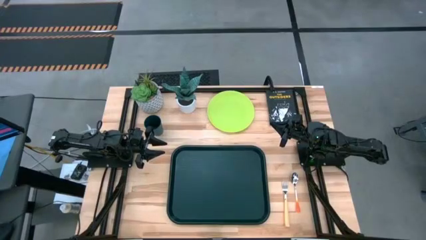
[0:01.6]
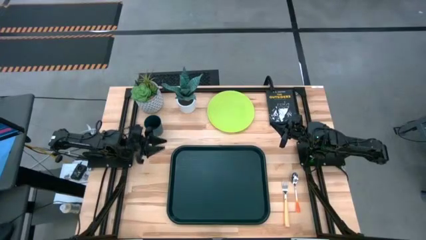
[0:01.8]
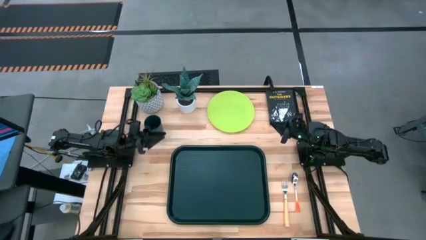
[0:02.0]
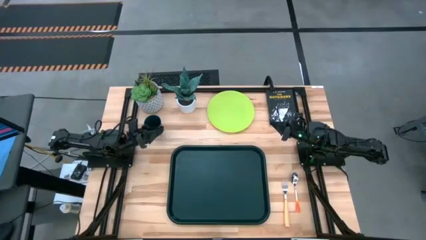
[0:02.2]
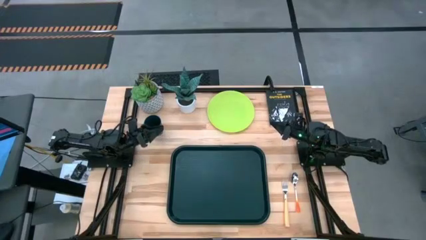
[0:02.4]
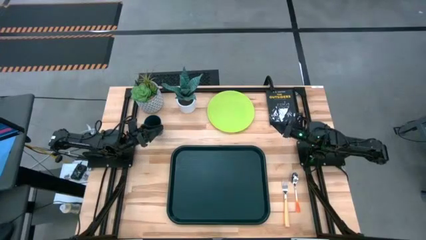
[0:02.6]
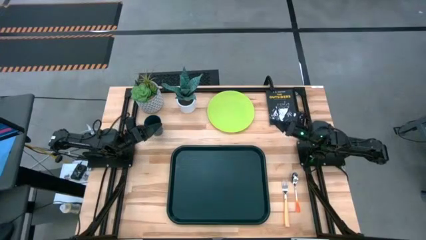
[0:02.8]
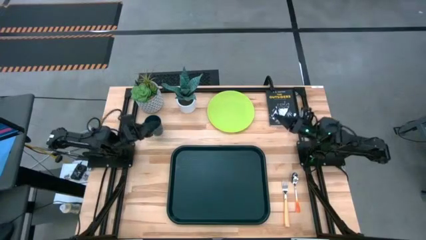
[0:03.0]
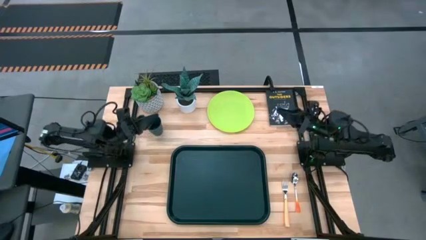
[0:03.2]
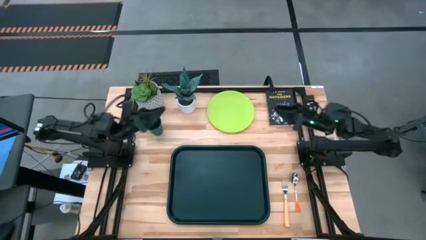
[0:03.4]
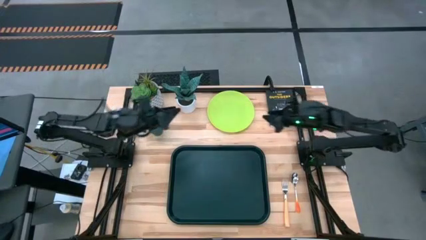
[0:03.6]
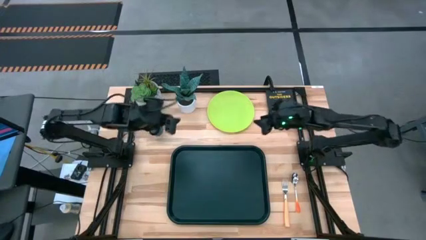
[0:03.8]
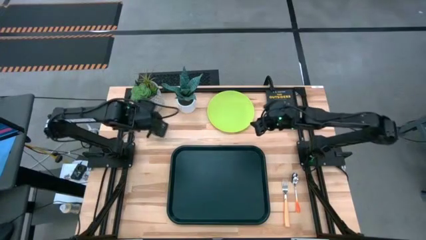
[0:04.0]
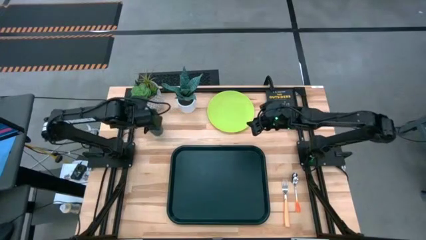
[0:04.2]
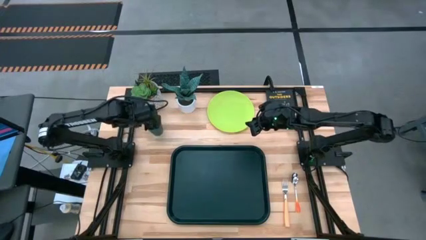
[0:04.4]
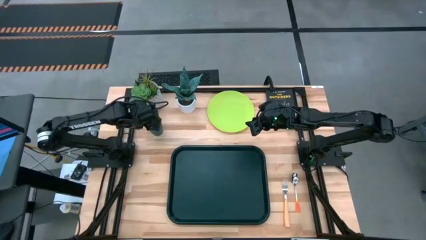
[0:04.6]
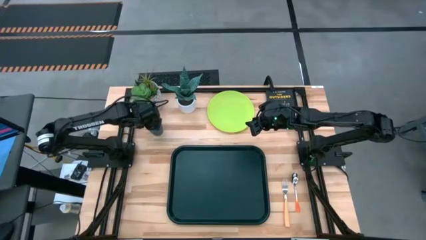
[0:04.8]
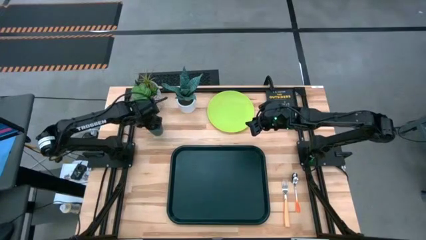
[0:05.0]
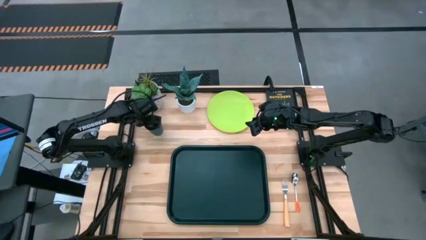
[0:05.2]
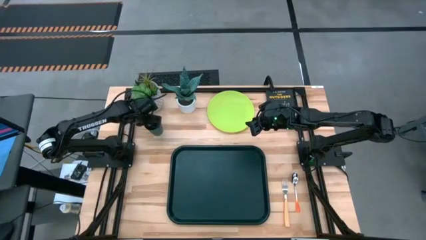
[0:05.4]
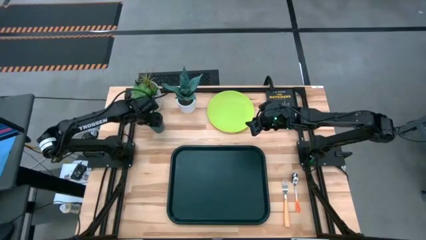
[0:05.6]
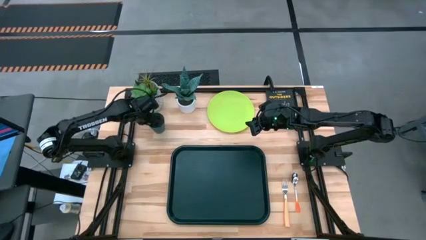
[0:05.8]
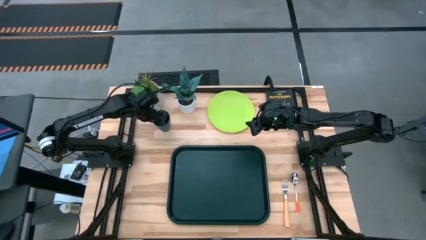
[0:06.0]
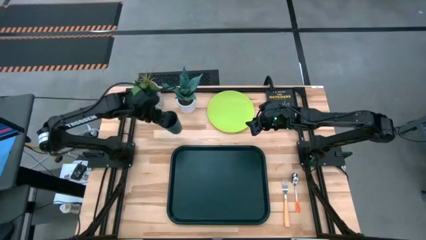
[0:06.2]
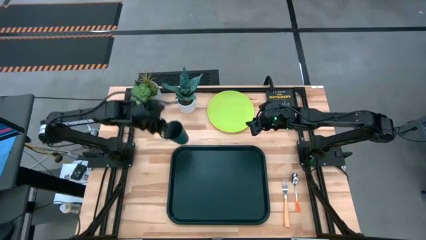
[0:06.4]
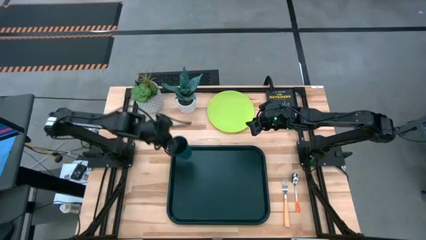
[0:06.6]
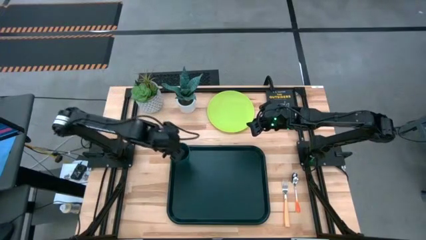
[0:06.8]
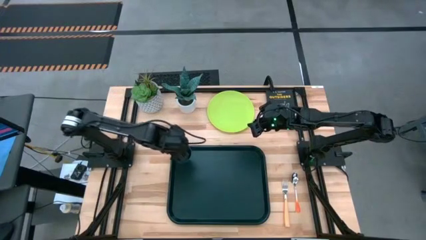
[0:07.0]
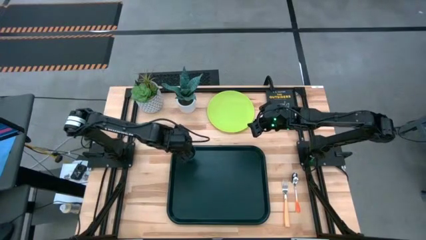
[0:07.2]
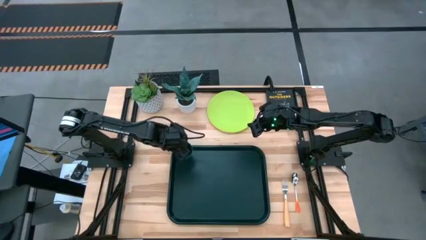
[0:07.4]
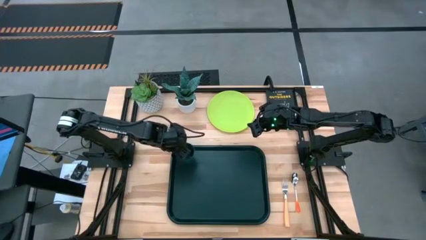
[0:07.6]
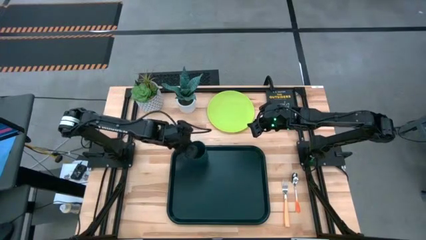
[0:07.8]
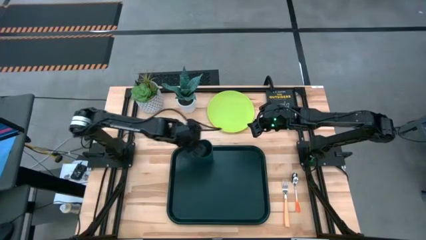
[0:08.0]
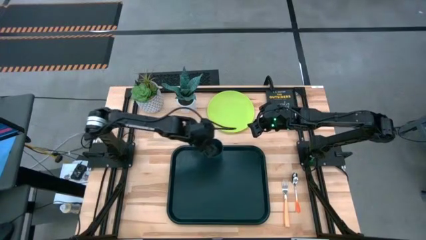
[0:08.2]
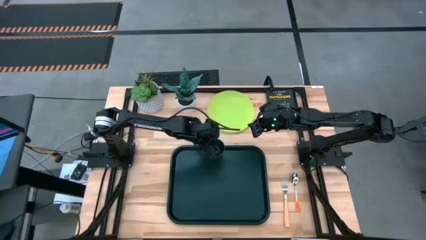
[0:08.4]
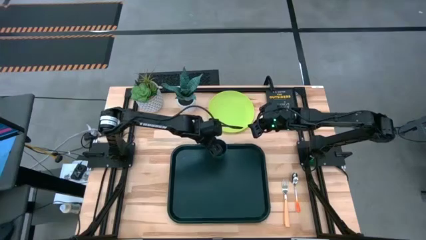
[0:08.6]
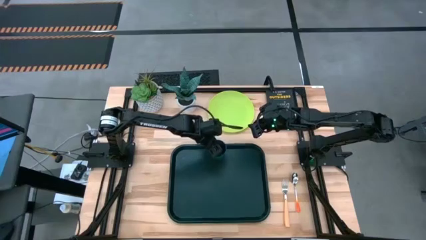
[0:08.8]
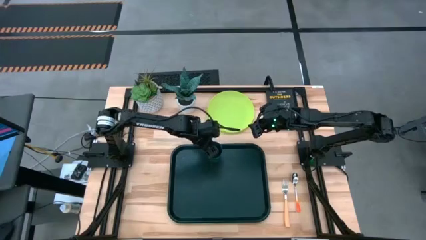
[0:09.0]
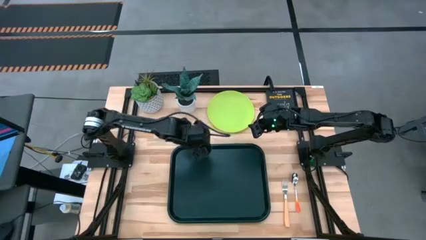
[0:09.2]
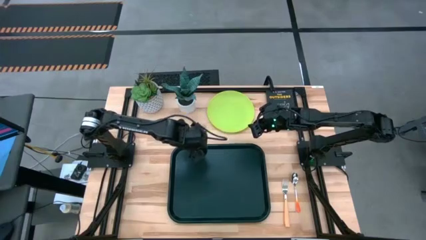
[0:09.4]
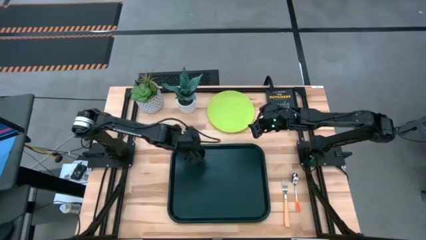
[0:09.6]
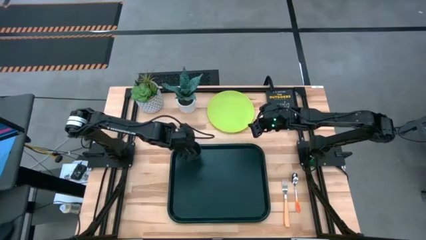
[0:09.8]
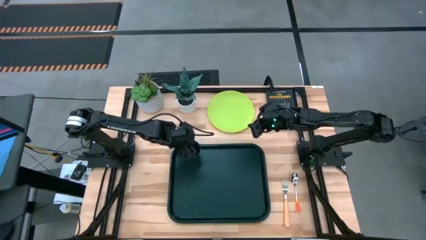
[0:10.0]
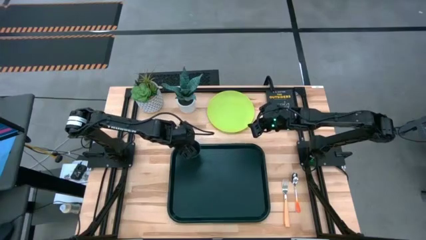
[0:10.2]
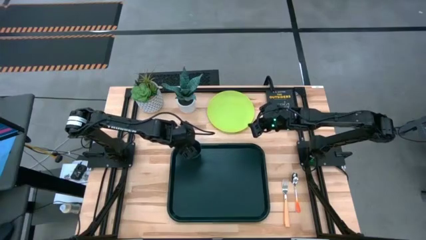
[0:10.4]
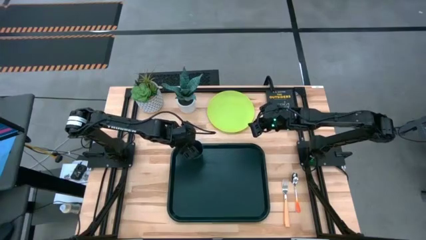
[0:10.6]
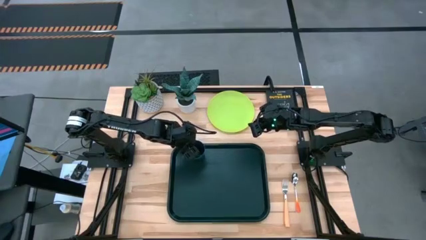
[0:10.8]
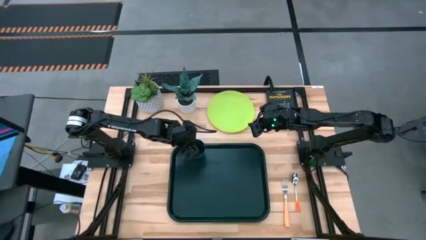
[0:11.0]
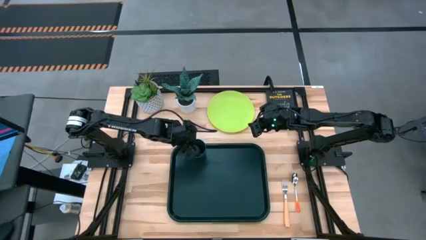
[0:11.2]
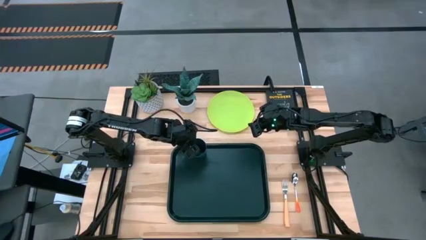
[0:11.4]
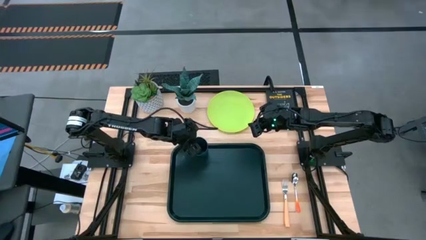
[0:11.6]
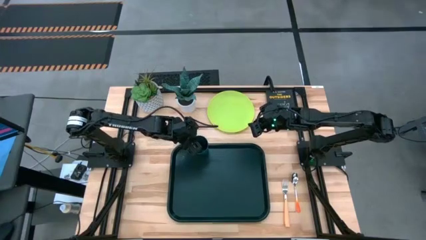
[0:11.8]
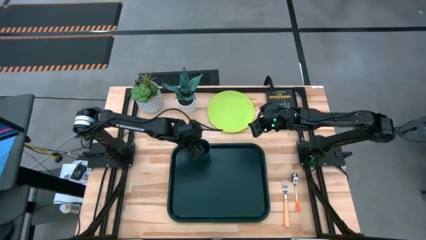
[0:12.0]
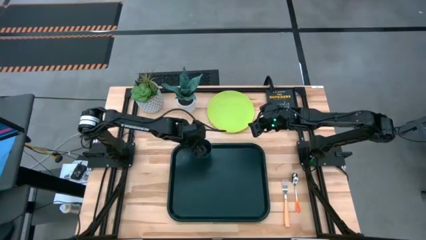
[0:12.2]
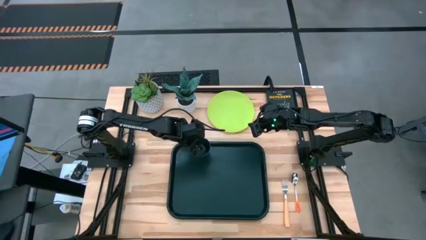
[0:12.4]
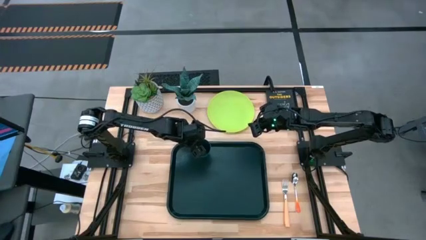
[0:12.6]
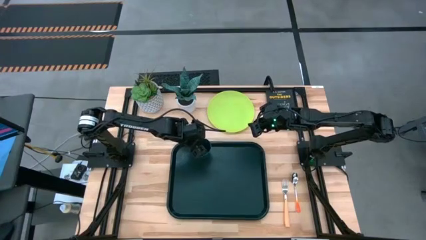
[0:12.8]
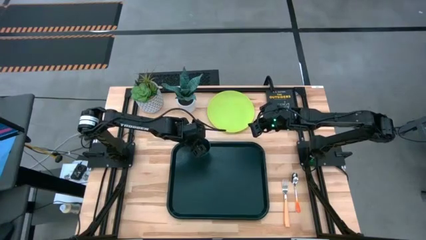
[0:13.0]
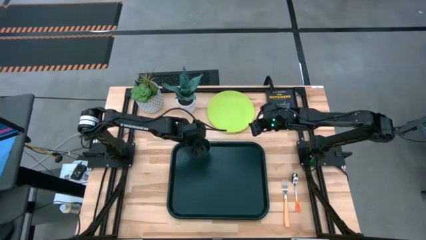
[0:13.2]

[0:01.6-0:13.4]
Task: Pick and place plate/cup/fork/spoon on tray
Put the black cup on the black serving tray
